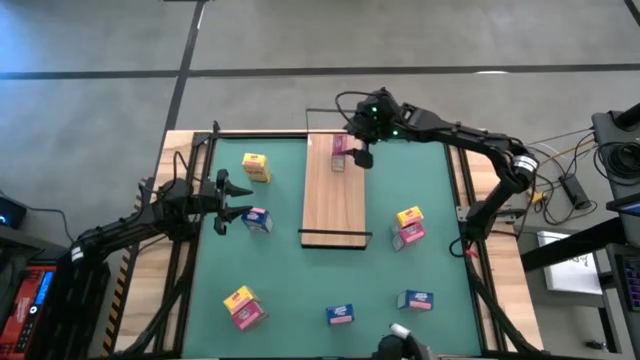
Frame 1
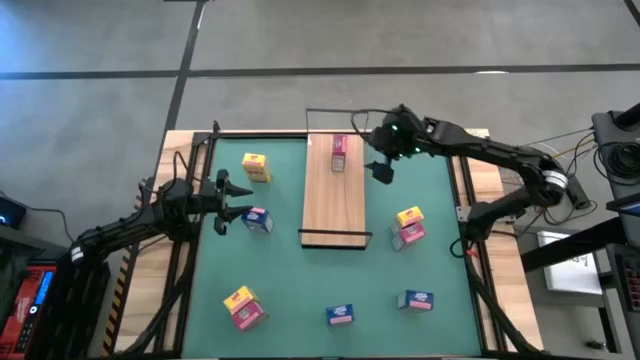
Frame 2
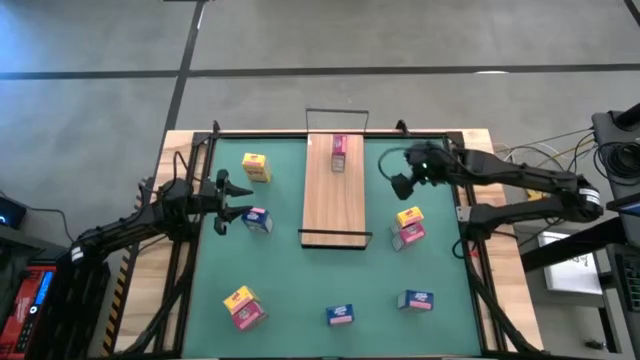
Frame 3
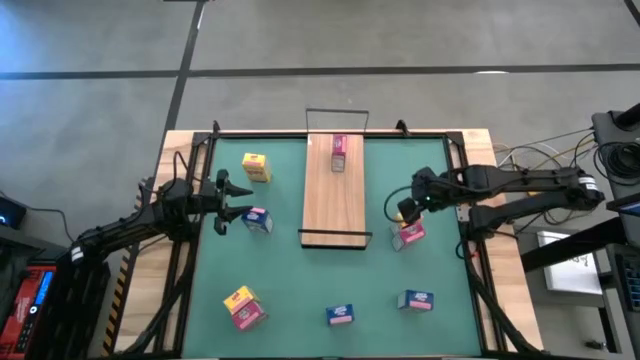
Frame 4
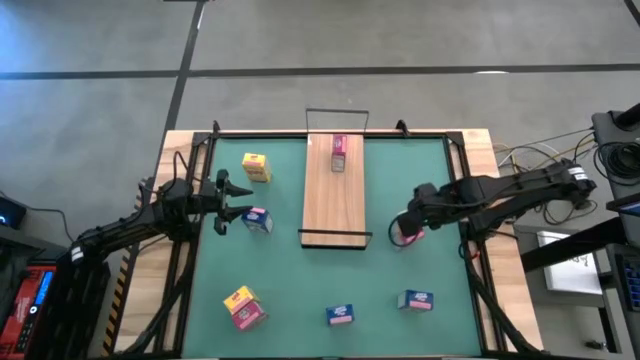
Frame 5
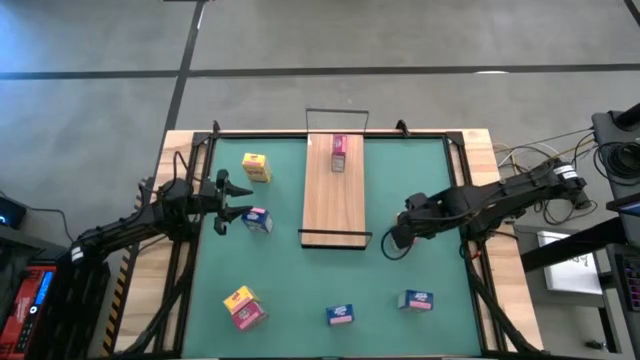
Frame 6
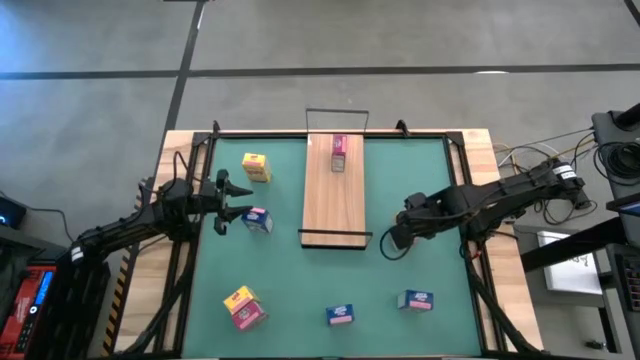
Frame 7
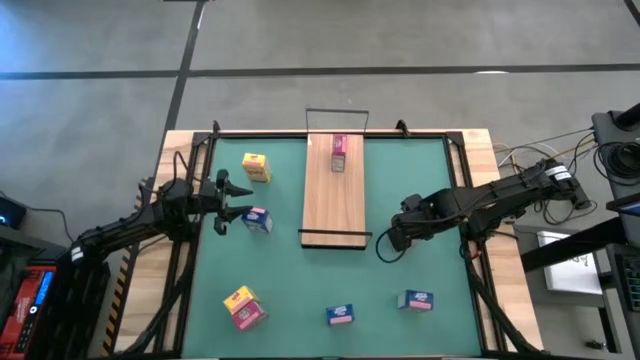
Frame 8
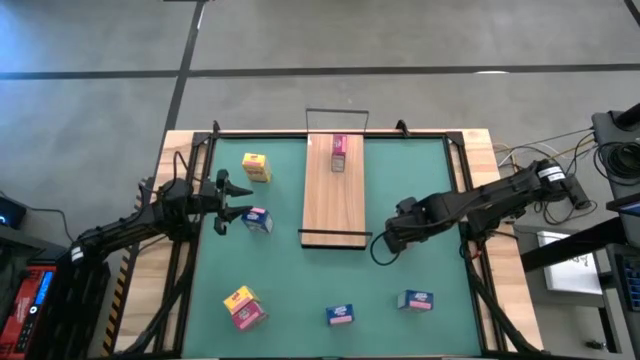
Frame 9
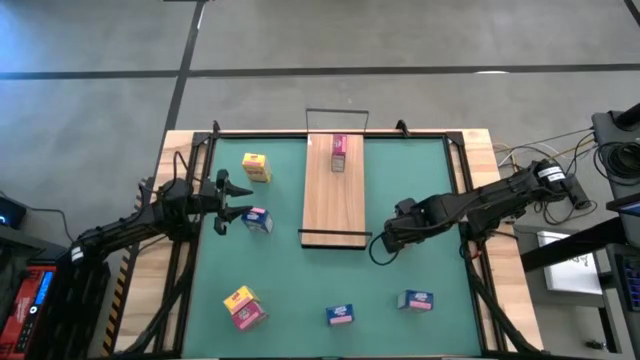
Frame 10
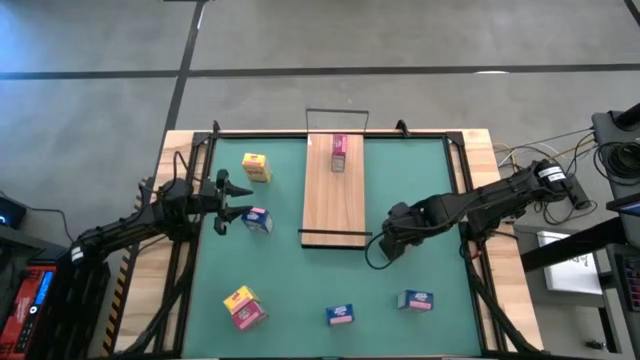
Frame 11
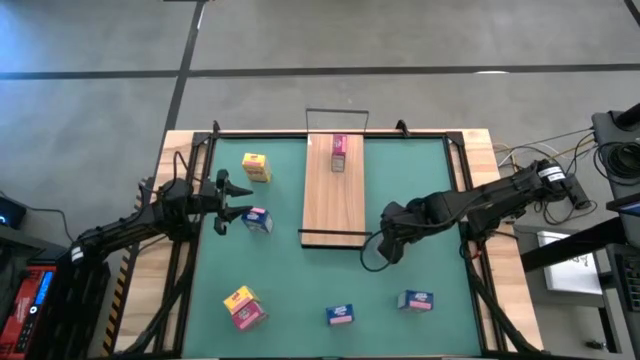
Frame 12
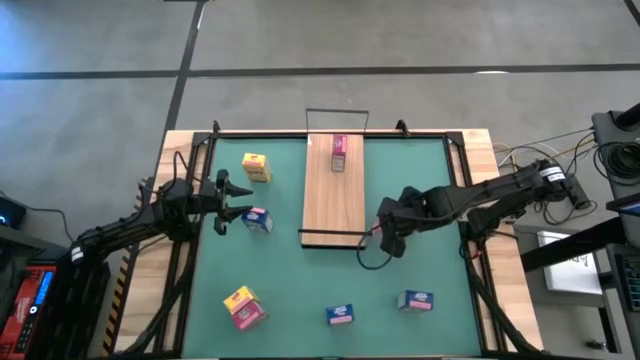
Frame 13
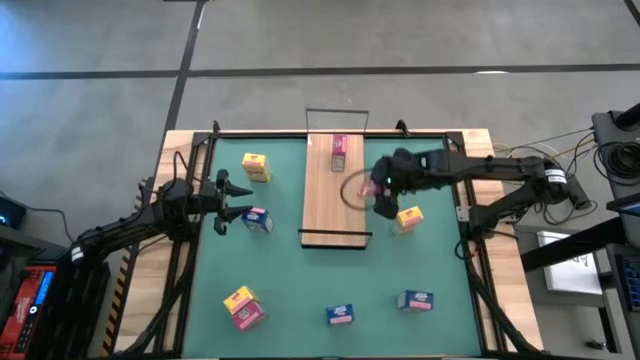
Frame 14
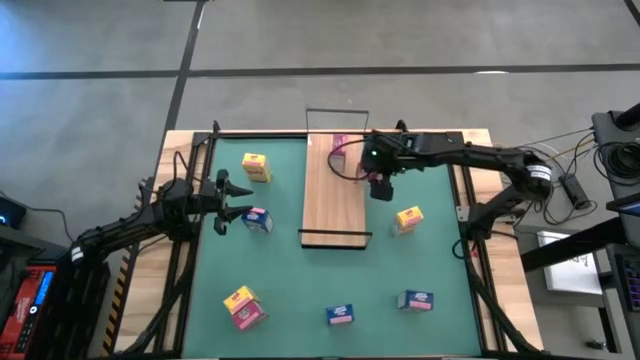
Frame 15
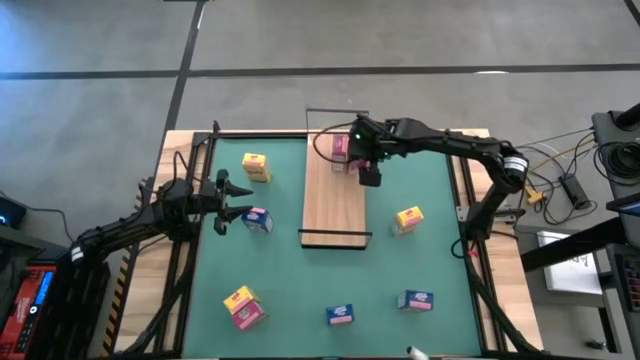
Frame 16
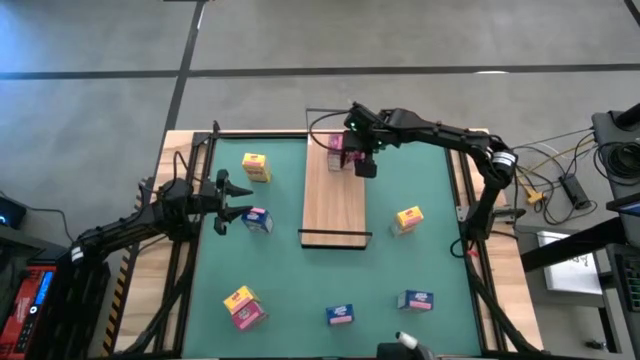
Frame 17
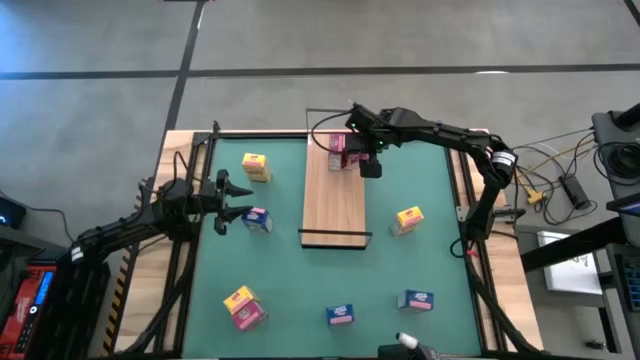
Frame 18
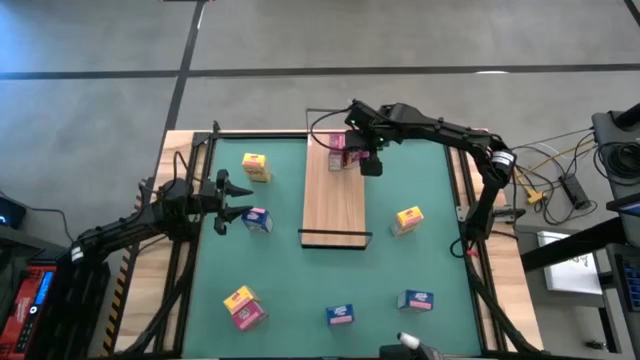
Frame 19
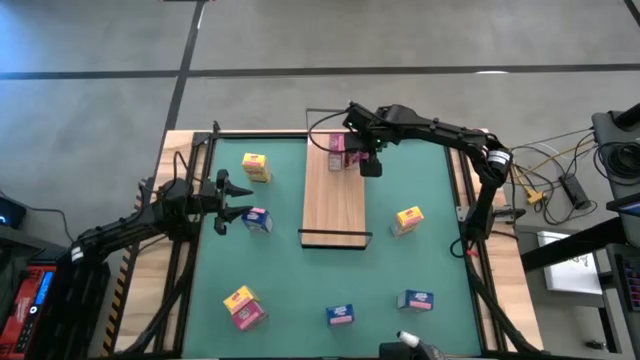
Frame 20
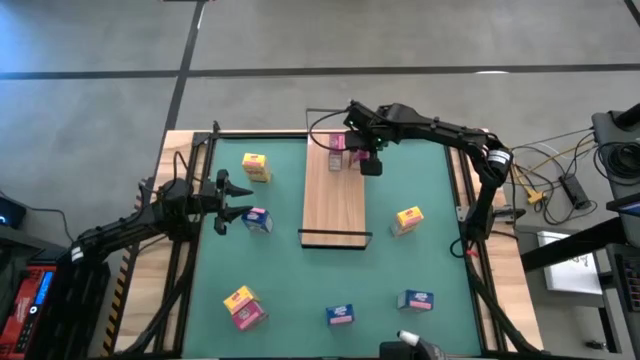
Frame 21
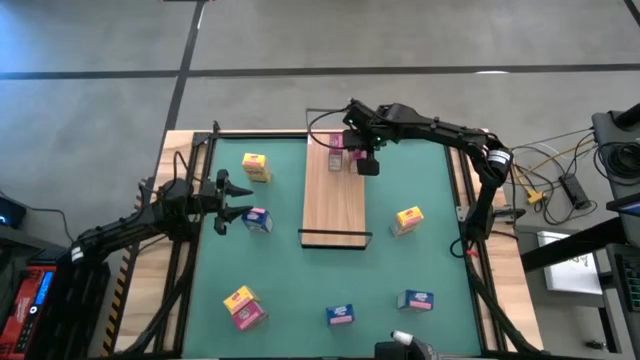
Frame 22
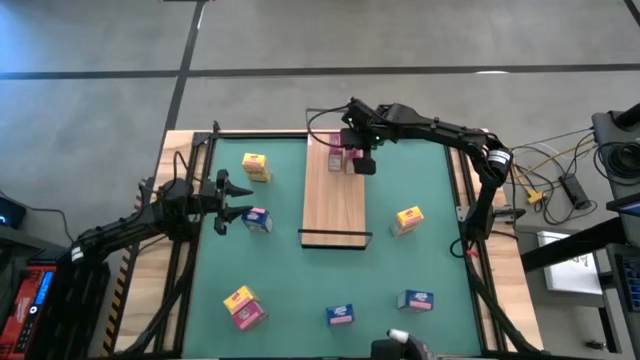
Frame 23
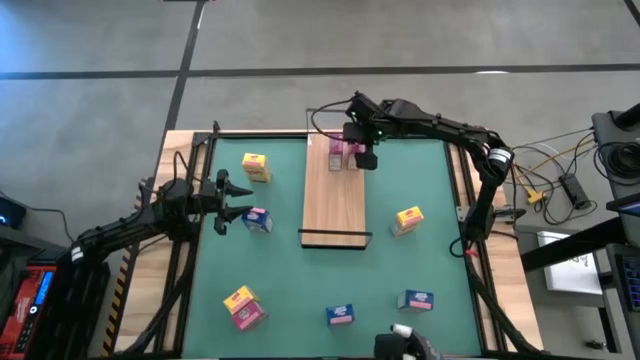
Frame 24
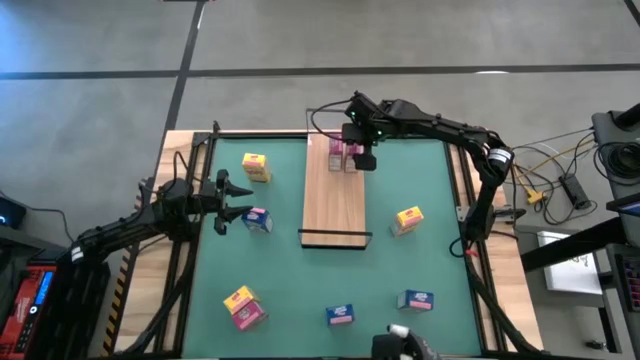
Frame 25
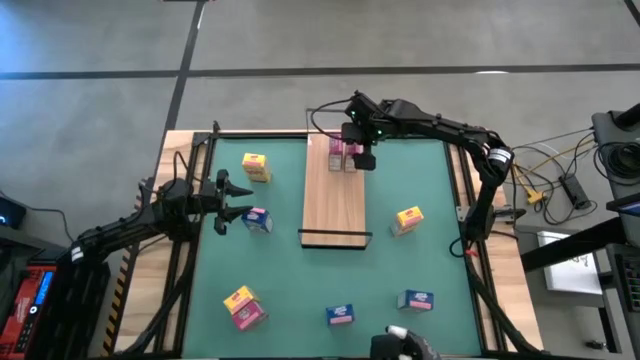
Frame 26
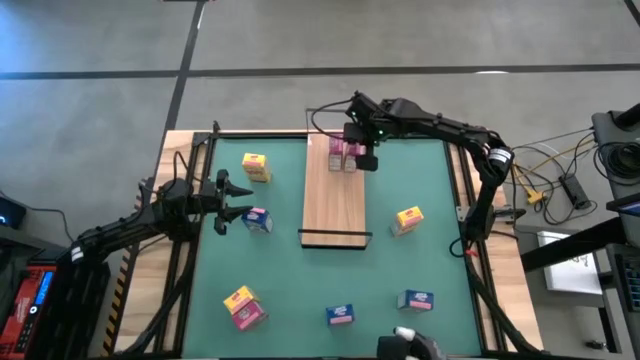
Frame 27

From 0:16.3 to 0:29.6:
Task: Stack cereal on shelf
Put the right pink cereal box on the shelf

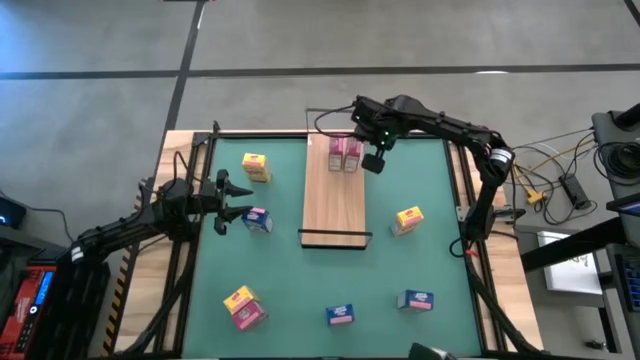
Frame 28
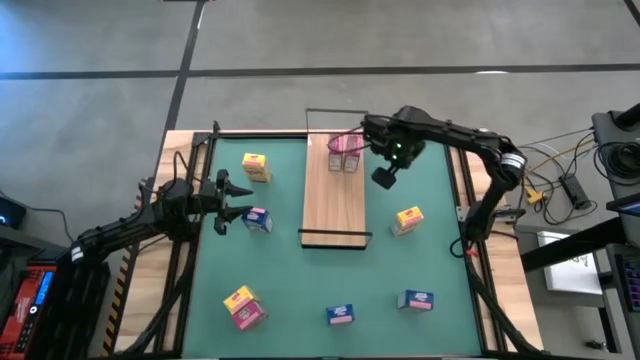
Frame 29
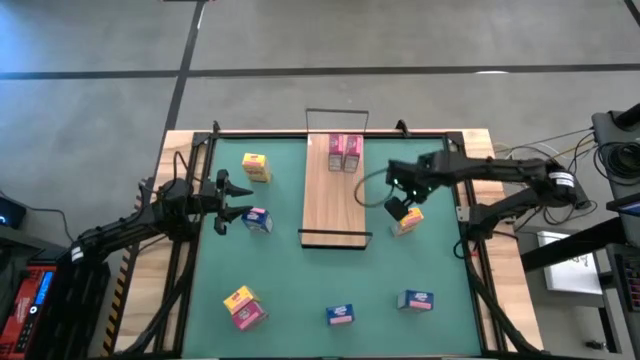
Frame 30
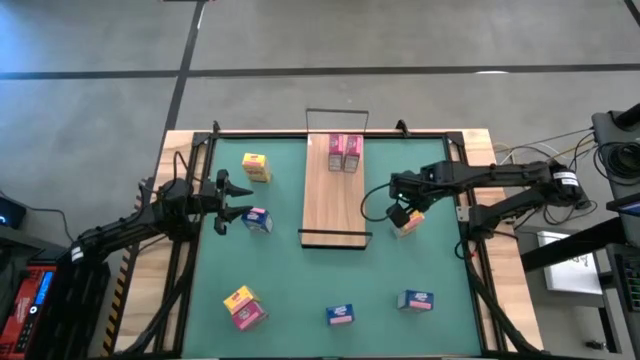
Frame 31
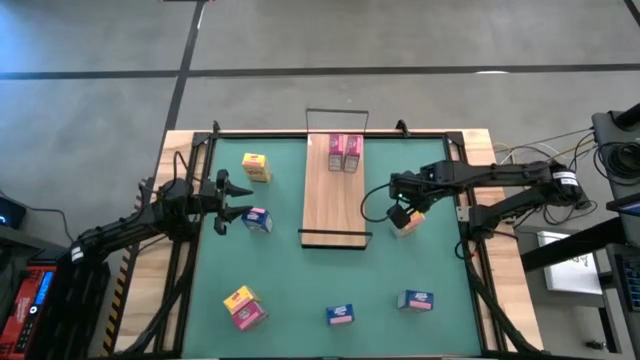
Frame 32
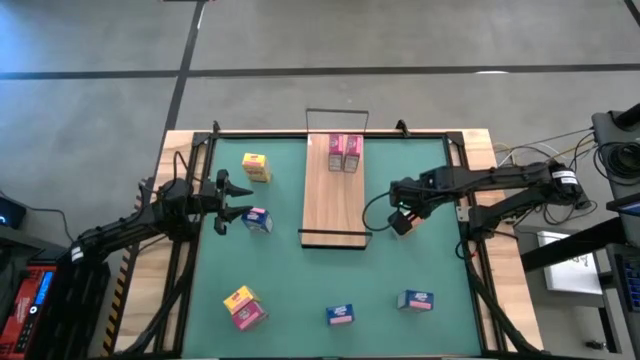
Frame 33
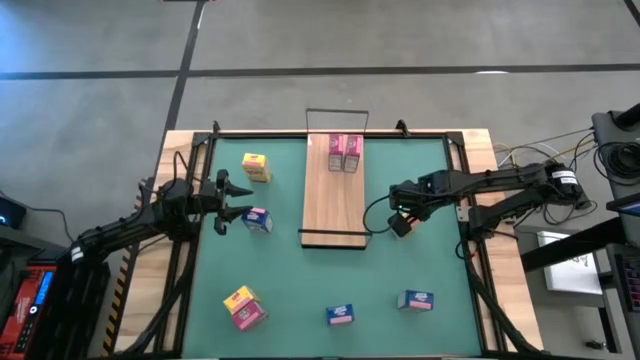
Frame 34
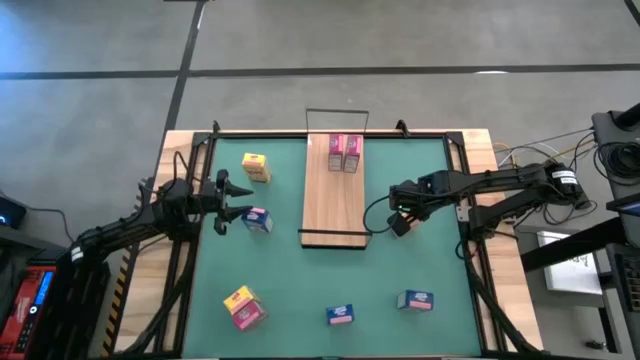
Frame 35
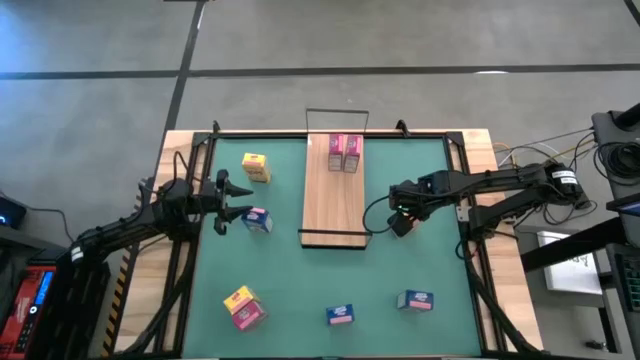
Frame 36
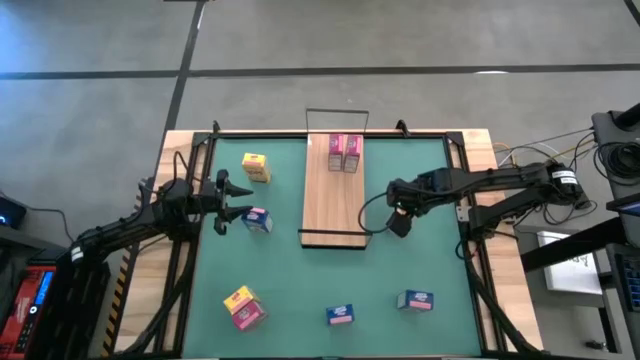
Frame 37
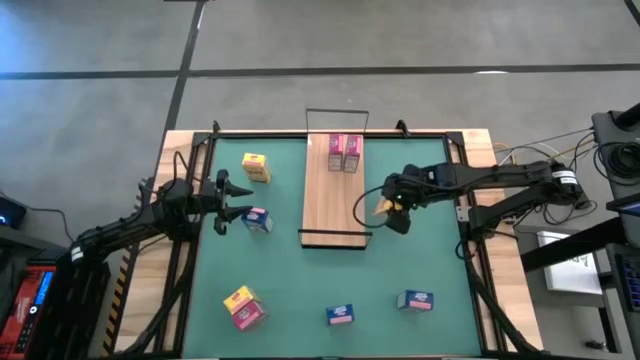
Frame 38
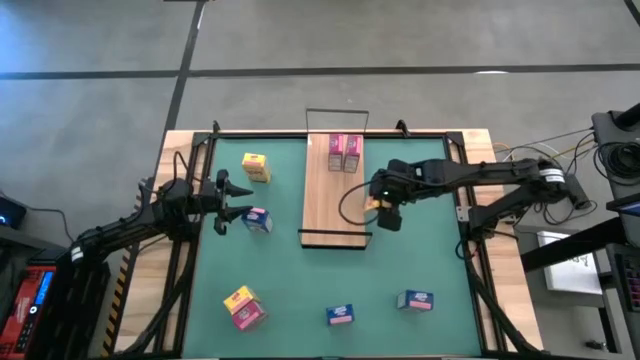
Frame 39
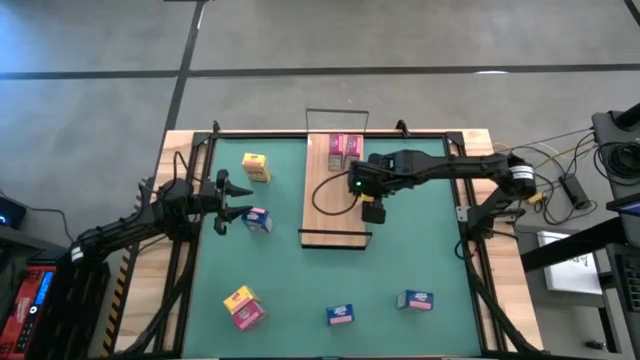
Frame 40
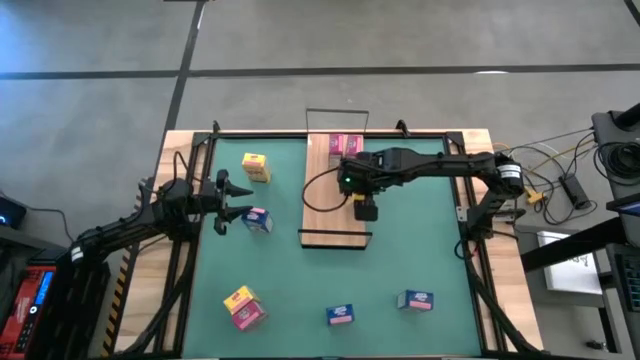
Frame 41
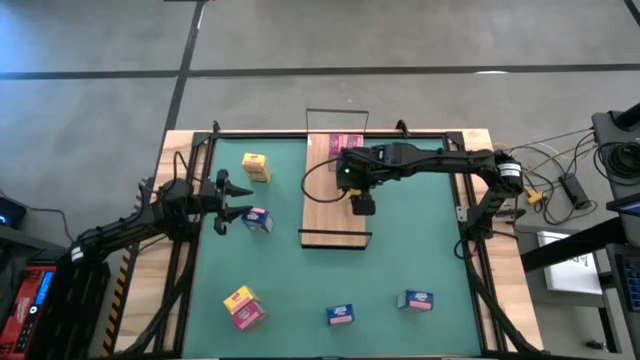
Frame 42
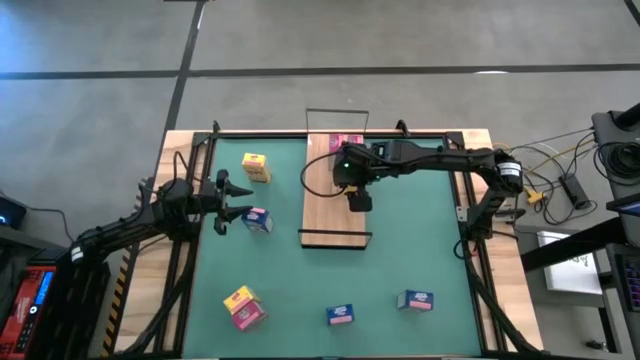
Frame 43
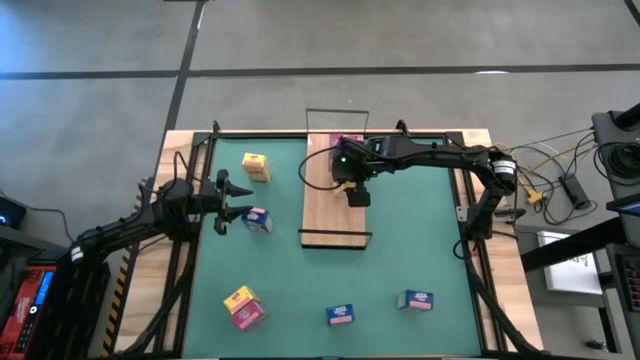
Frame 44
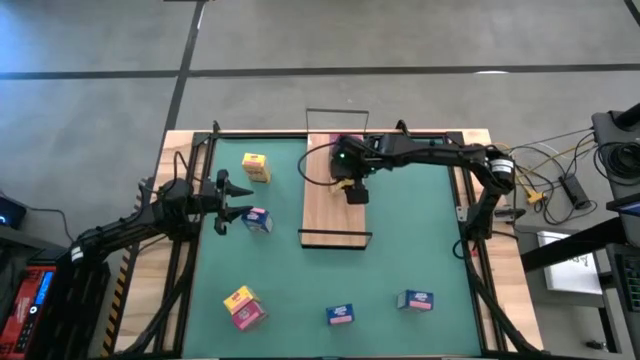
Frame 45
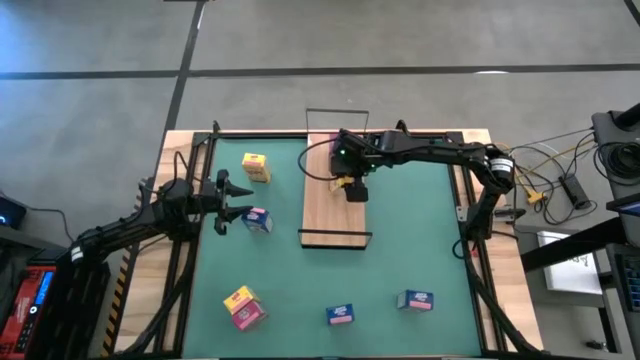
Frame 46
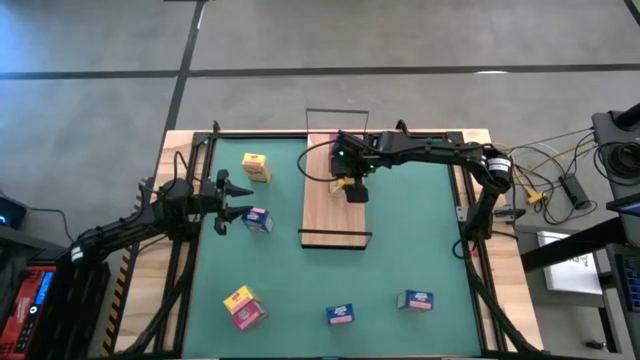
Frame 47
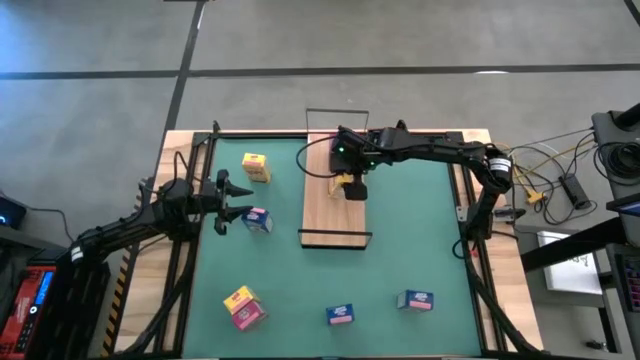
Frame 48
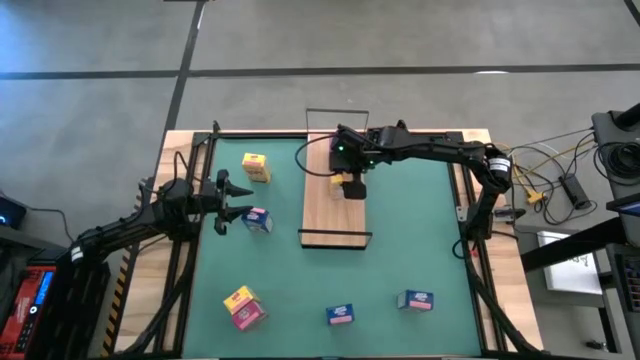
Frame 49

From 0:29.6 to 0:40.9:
Put the middle right yellow cereal box on the shelf
